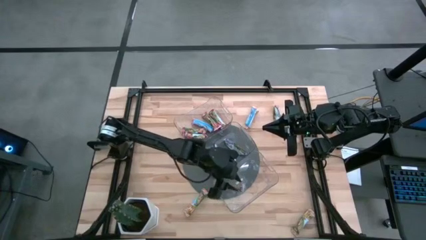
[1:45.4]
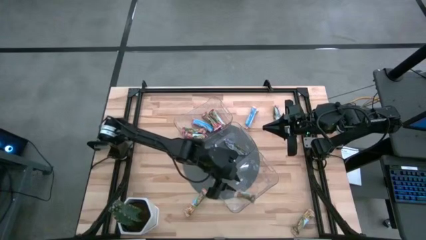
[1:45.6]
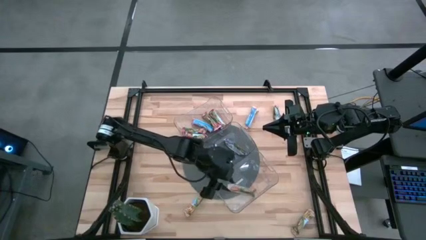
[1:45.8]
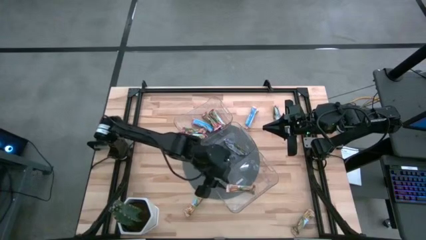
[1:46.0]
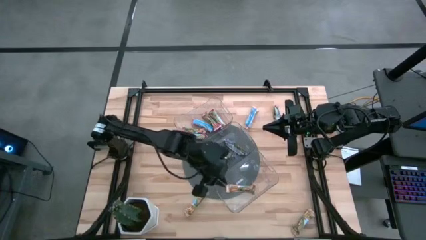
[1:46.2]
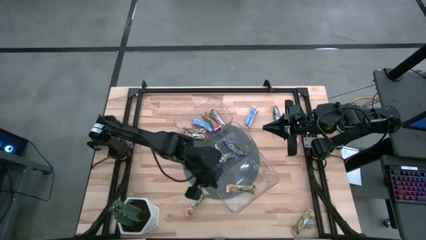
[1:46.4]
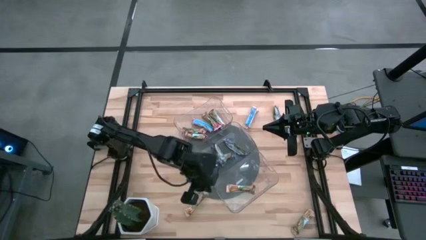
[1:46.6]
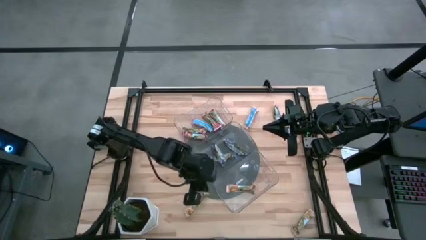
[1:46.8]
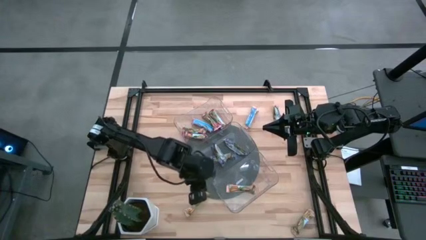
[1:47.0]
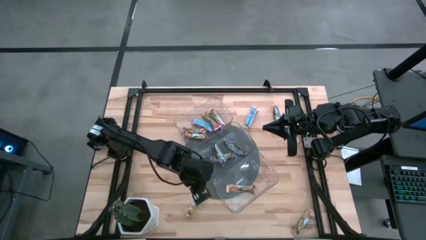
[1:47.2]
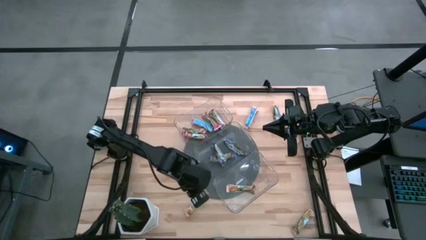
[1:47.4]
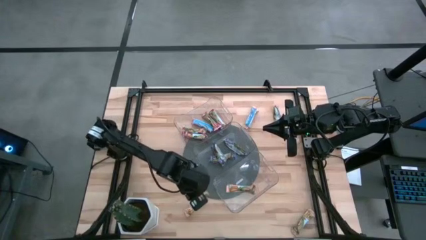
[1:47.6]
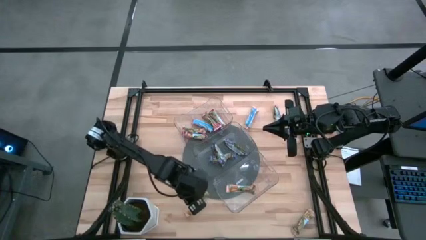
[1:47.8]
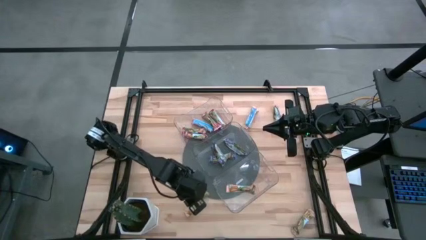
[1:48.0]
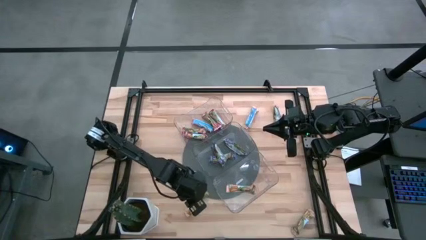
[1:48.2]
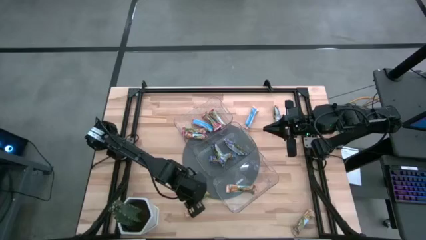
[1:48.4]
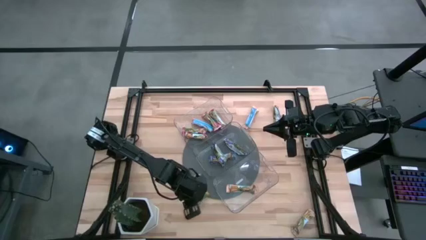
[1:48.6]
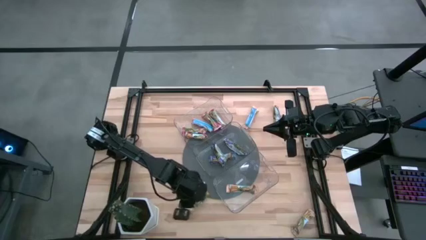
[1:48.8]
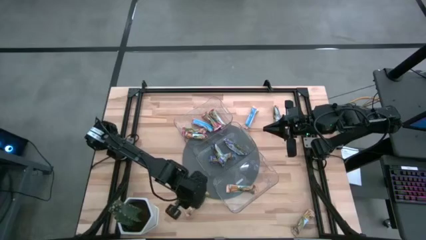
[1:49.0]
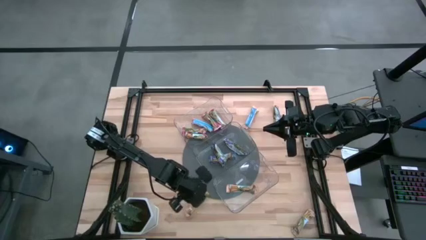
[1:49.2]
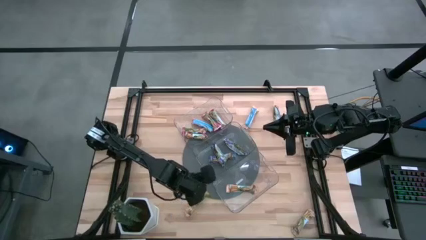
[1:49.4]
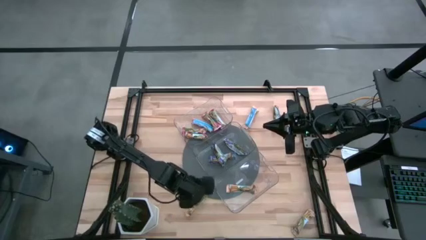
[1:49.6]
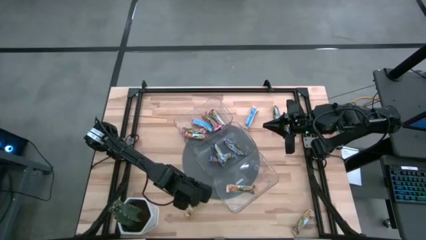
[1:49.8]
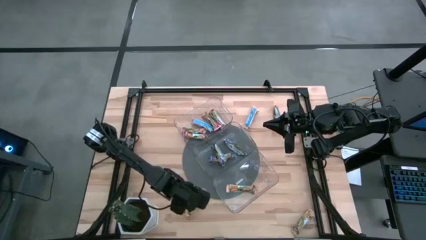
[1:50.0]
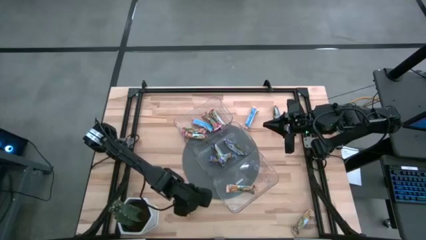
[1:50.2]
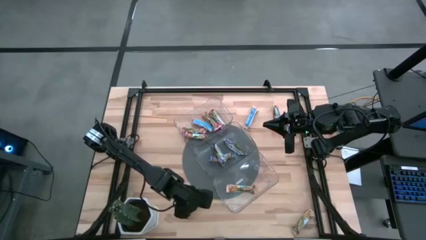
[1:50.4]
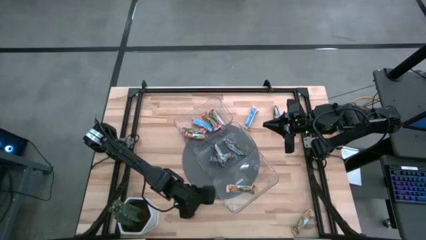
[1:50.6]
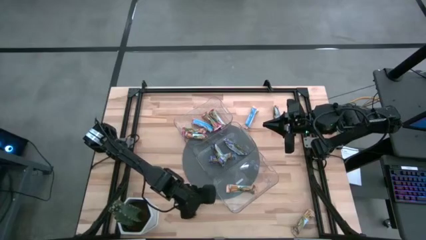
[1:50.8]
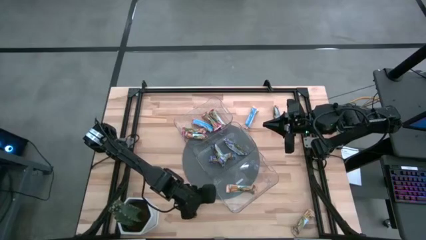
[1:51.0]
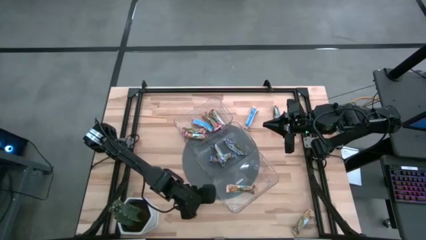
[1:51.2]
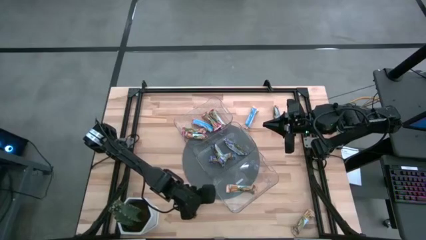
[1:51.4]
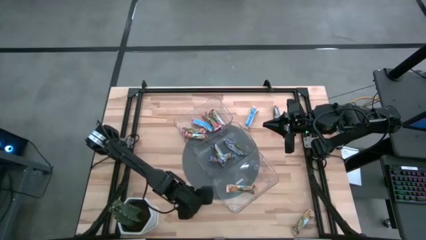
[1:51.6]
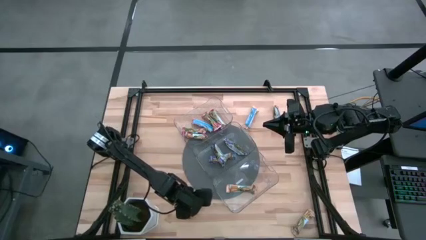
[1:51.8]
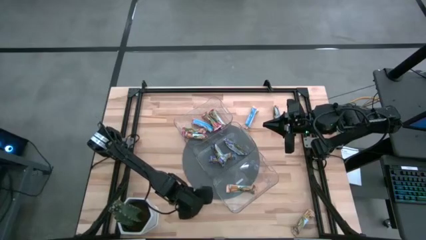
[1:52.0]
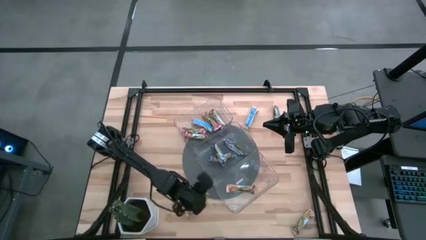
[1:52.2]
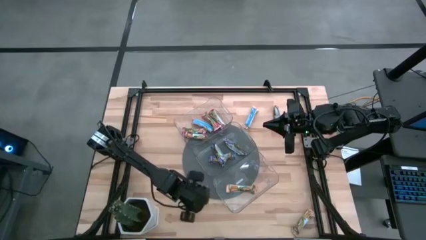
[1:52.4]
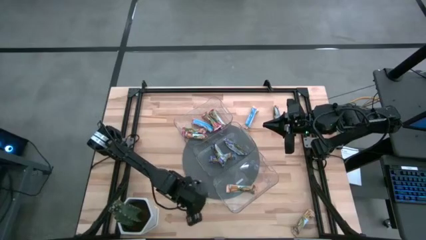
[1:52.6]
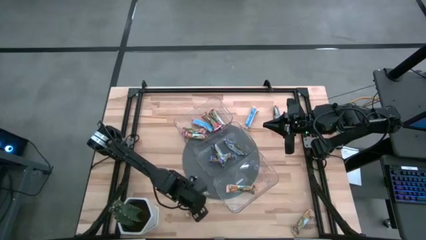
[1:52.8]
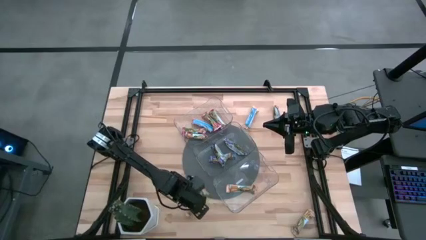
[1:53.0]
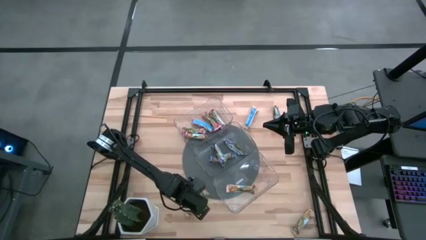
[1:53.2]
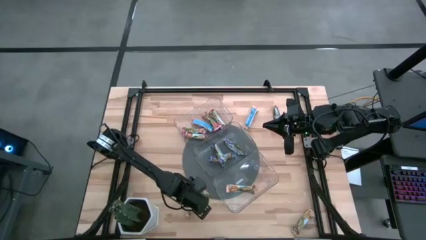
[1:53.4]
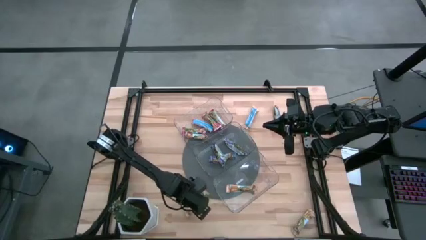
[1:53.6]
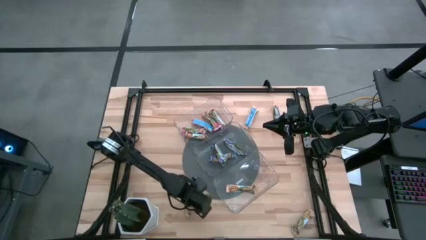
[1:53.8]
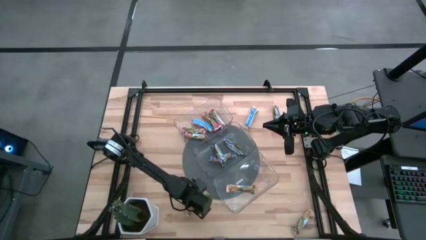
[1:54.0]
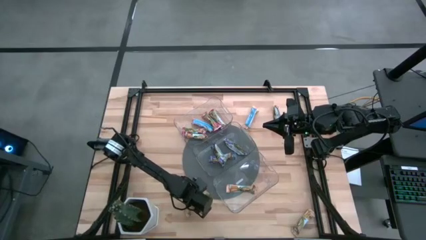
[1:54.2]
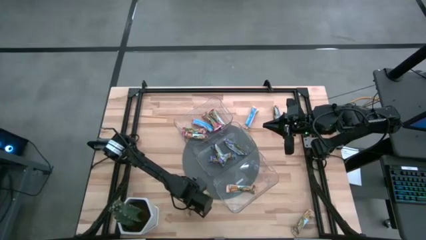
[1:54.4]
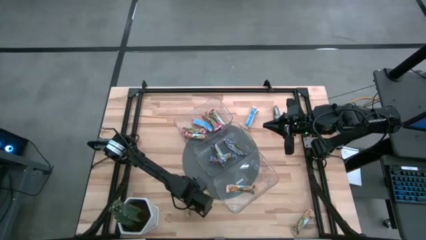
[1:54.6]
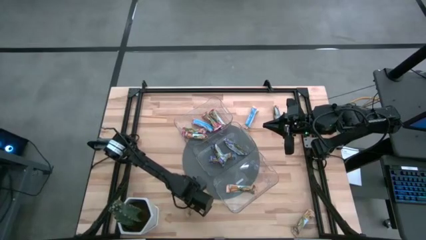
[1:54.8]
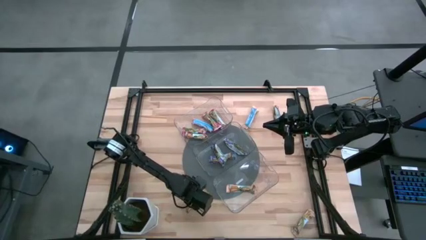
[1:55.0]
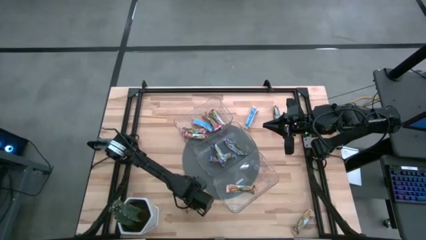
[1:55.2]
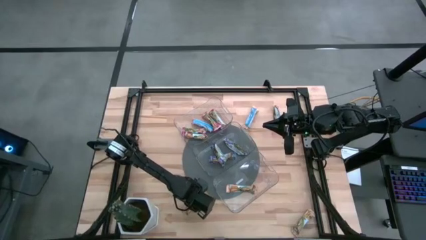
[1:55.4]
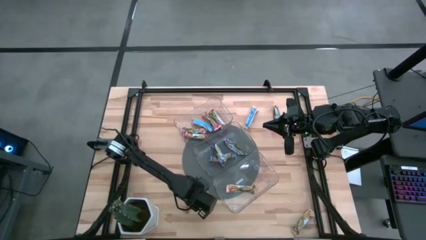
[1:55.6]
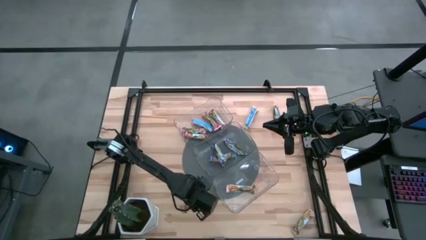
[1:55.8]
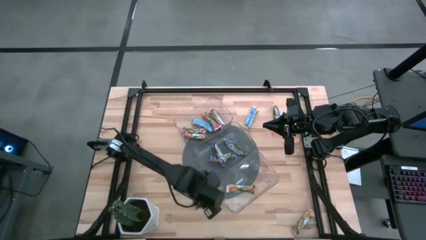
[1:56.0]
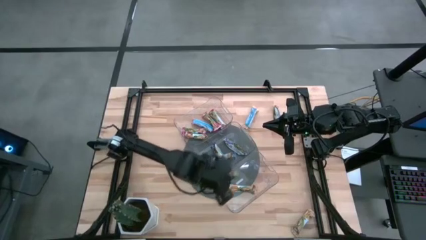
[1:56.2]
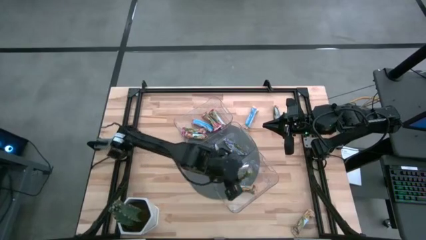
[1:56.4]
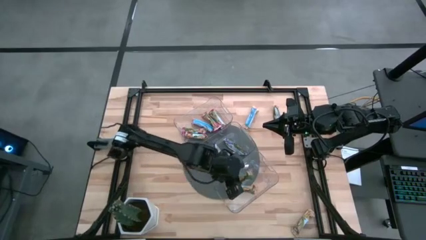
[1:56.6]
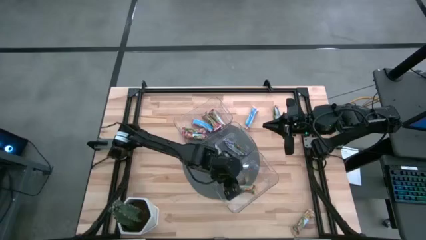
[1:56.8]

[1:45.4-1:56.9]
Task: Pick and place Granola Bars by type
Put the yellow granola bar into the bottom transparent bin

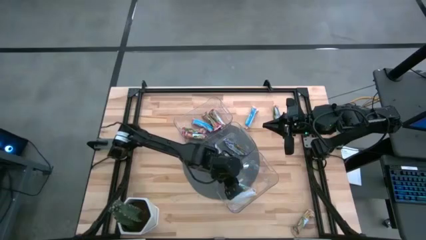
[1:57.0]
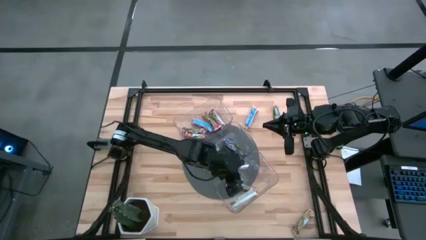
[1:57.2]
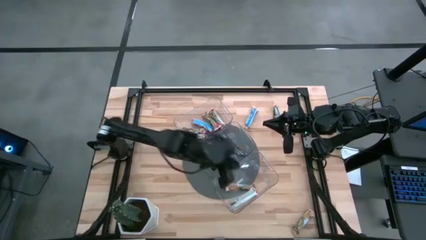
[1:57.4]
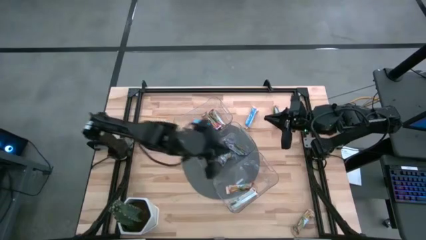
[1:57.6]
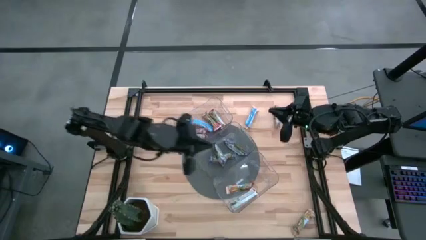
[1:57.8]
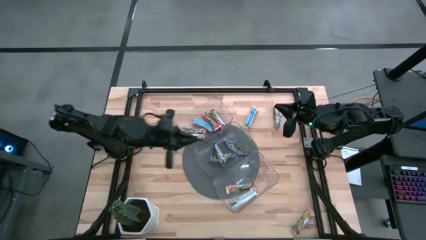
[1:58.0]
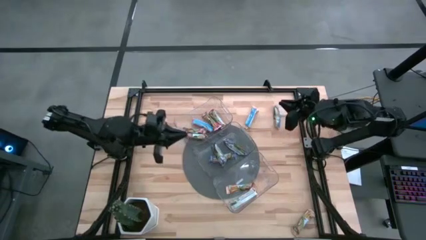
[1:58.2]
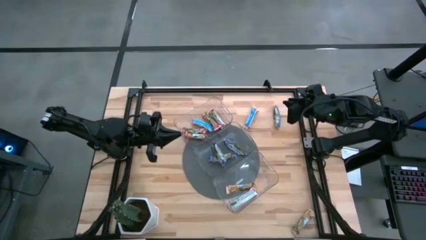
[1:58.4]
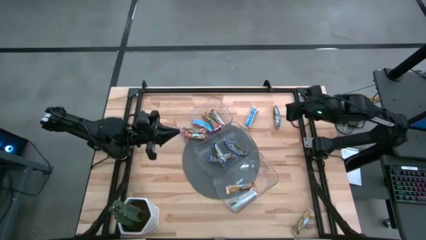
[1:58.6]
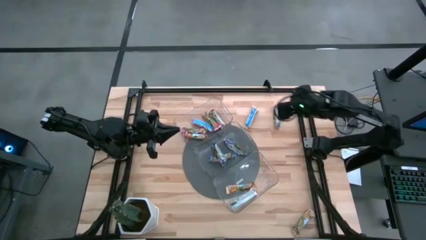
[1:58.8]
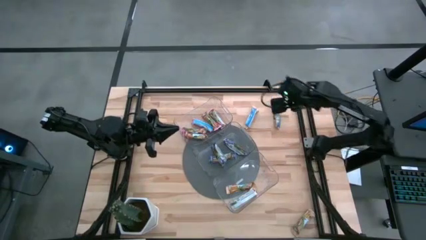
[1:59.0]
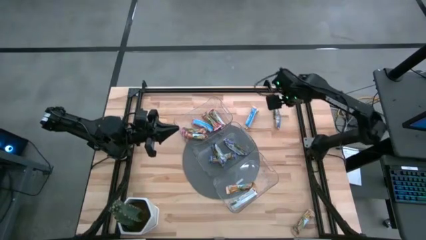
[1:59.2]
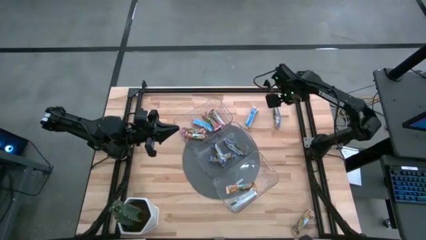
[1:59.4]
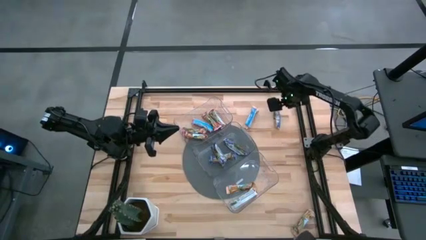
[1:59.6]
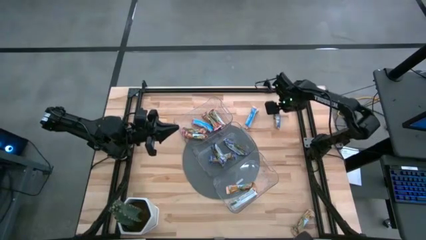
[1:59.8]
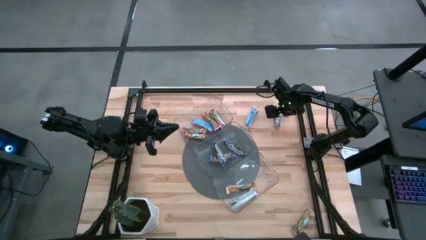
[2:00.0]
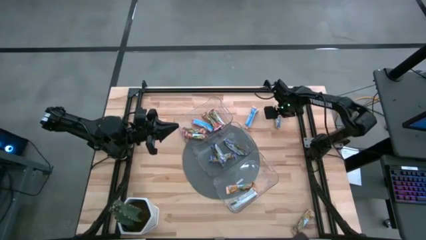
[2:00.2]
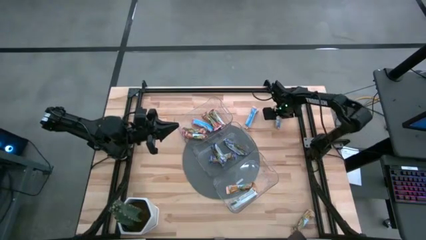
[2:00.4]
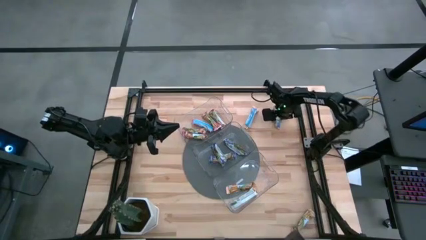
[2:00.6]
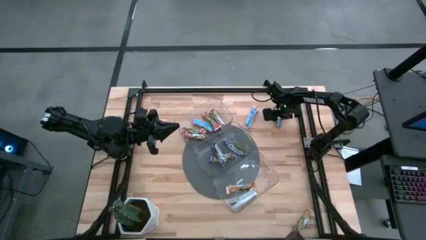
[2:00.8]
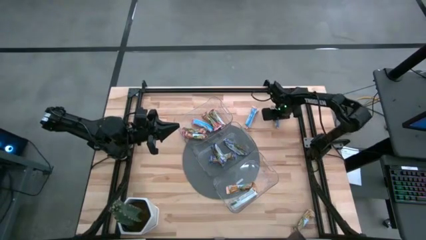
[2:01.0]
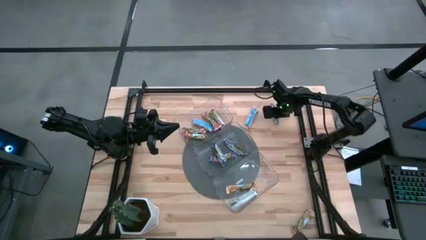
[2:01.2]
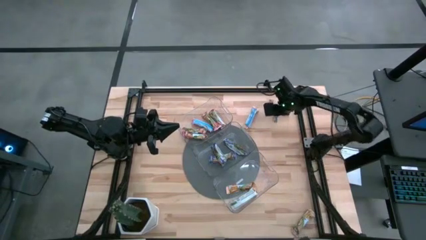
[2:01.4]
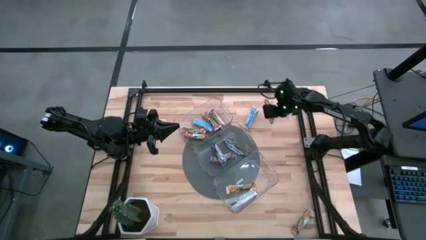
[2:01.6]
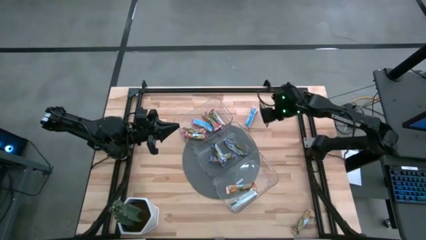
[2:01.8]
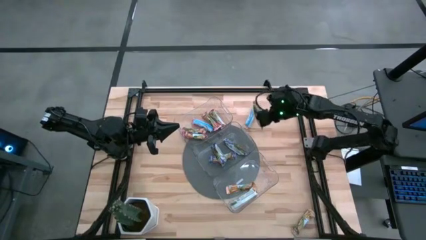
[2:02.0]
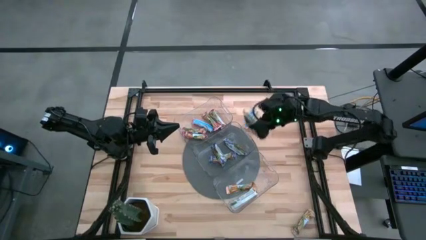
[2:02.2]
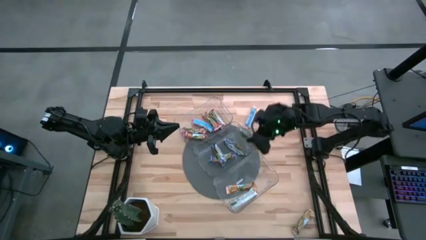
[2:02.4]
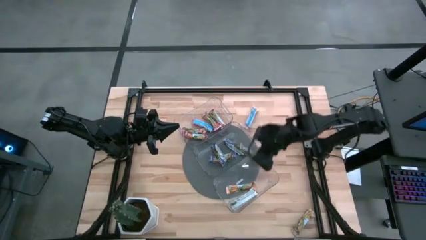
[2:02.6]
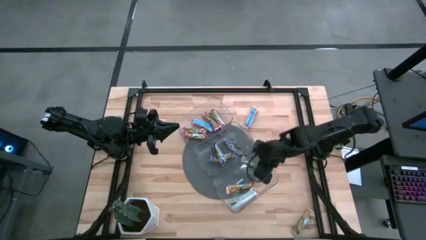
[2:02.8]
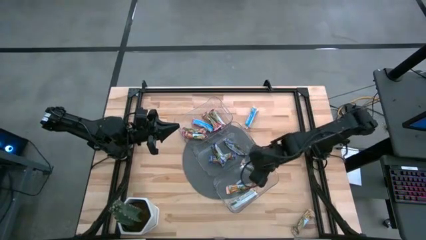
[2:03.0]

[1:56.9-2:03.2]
Put the yellow granola bar into the bottom transparent bin
